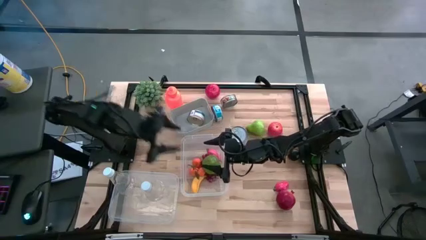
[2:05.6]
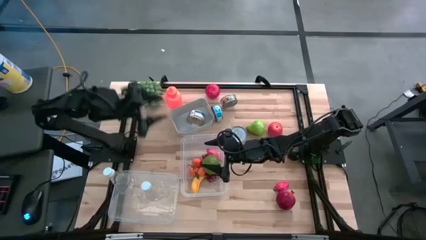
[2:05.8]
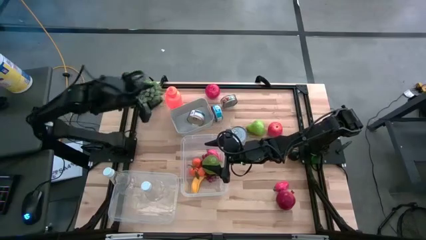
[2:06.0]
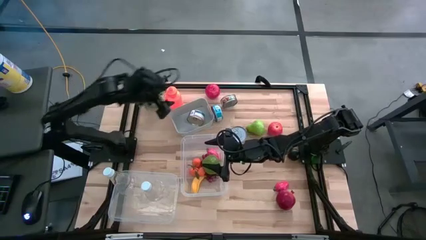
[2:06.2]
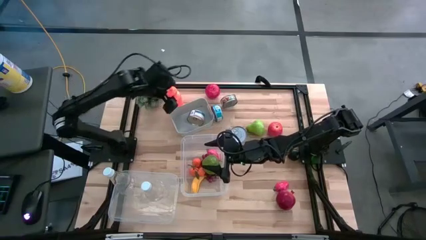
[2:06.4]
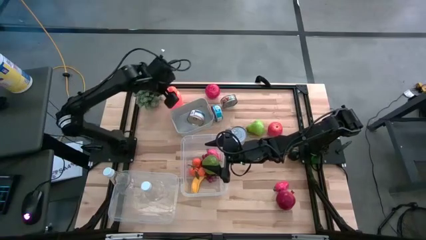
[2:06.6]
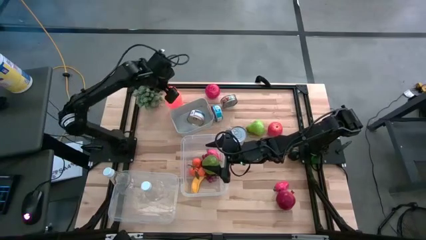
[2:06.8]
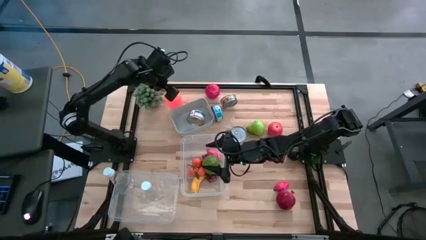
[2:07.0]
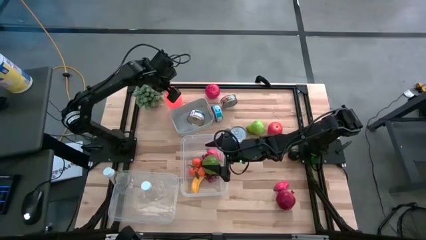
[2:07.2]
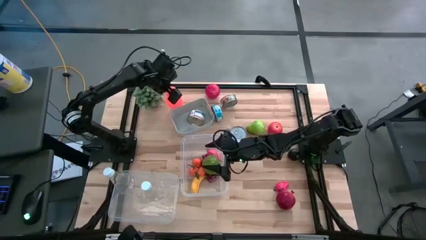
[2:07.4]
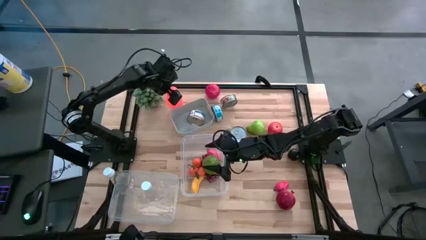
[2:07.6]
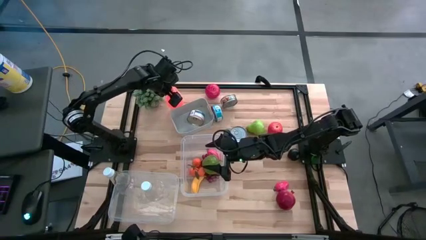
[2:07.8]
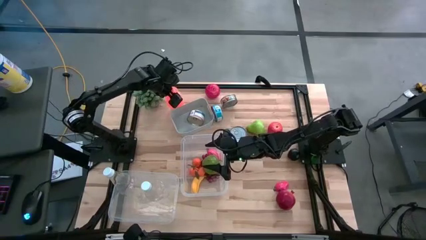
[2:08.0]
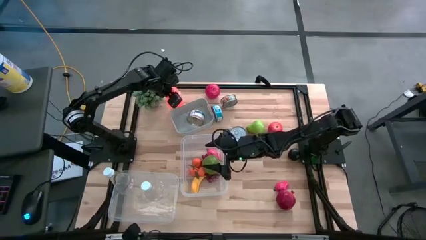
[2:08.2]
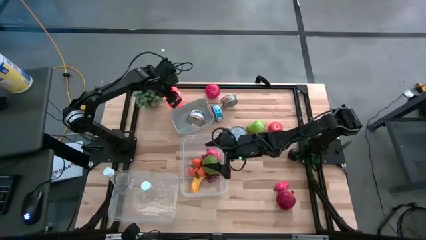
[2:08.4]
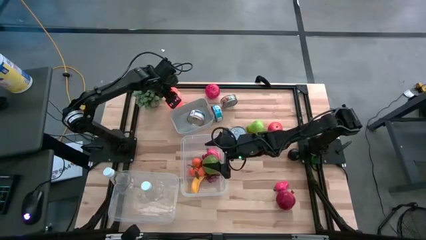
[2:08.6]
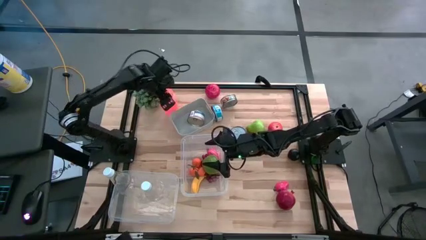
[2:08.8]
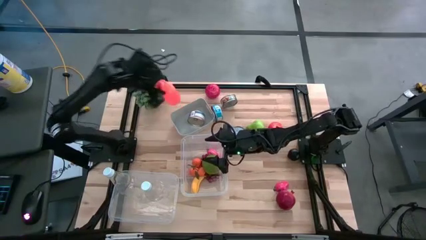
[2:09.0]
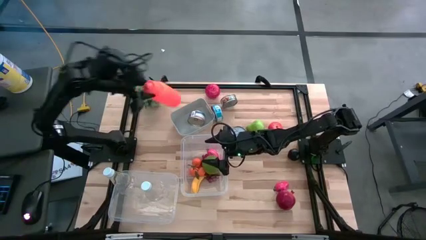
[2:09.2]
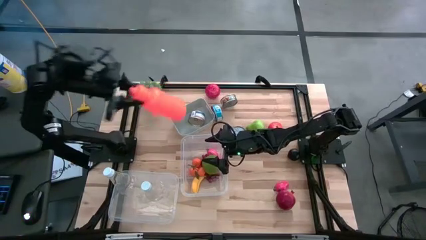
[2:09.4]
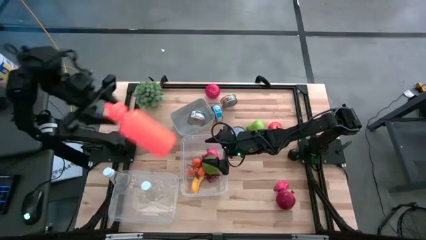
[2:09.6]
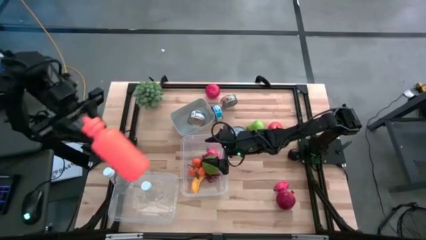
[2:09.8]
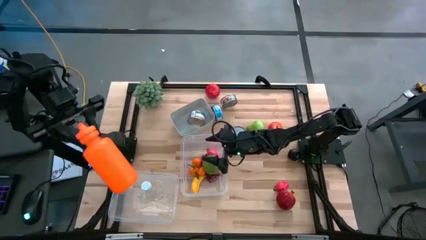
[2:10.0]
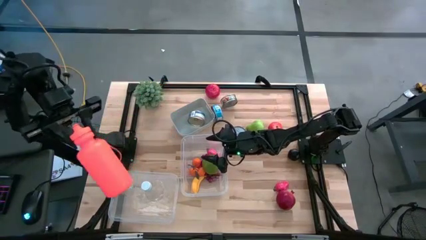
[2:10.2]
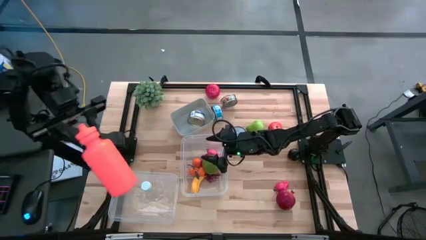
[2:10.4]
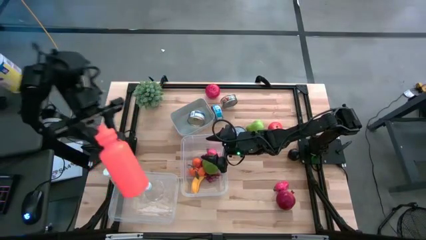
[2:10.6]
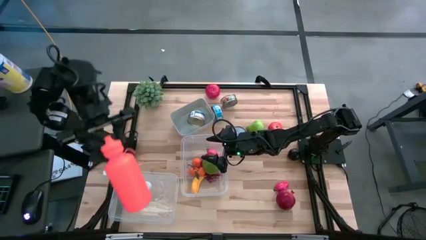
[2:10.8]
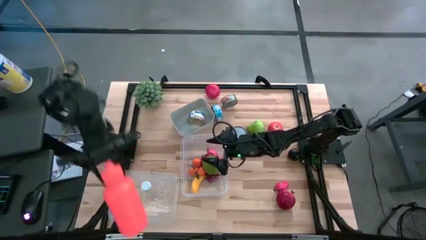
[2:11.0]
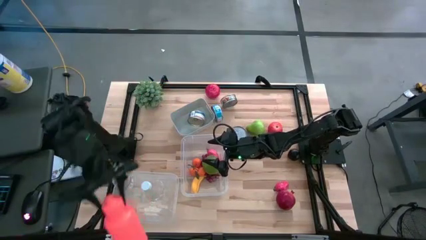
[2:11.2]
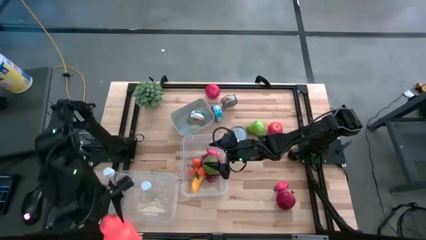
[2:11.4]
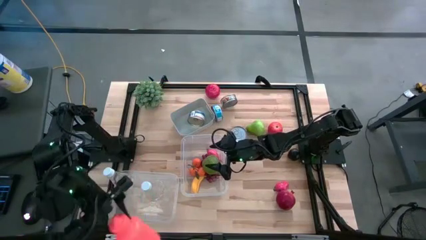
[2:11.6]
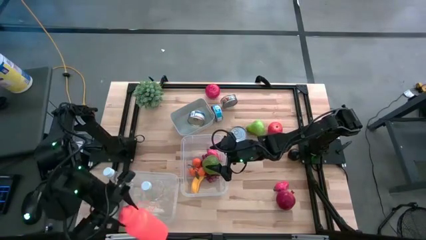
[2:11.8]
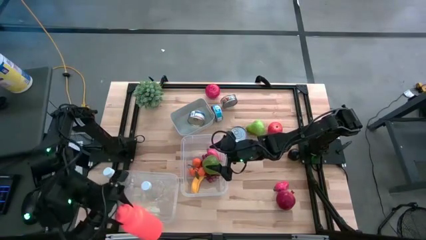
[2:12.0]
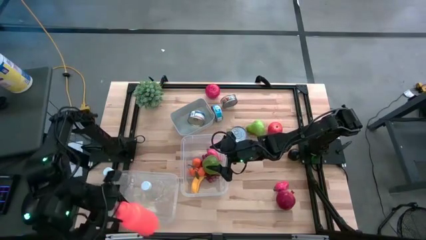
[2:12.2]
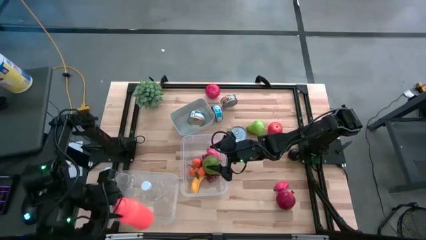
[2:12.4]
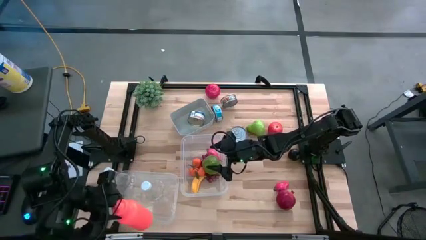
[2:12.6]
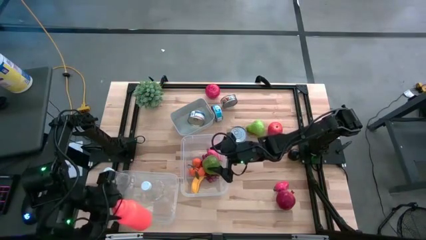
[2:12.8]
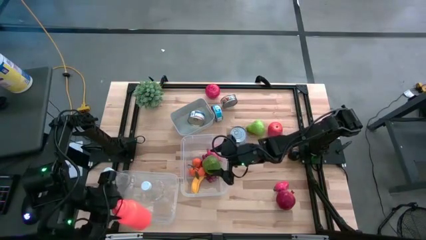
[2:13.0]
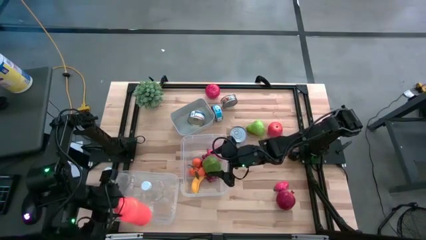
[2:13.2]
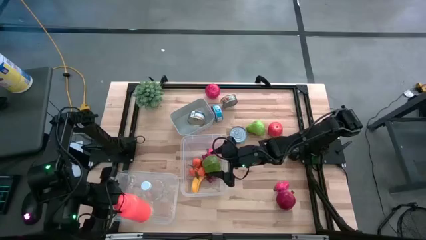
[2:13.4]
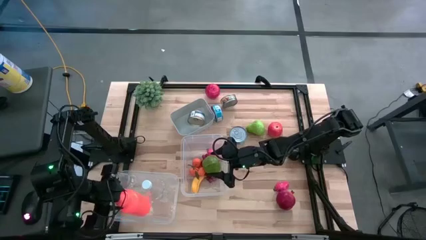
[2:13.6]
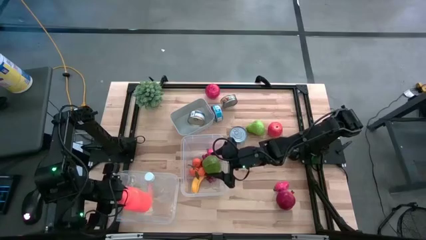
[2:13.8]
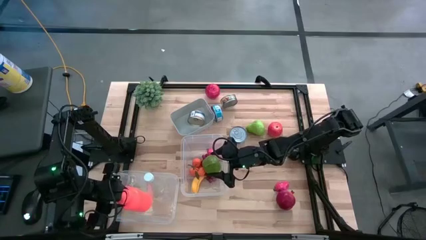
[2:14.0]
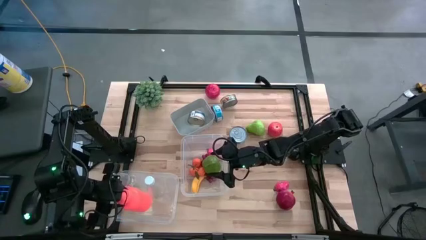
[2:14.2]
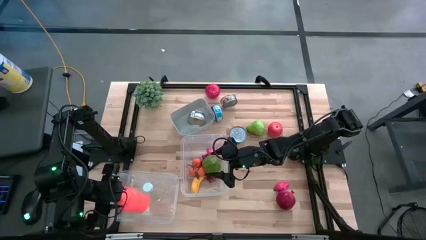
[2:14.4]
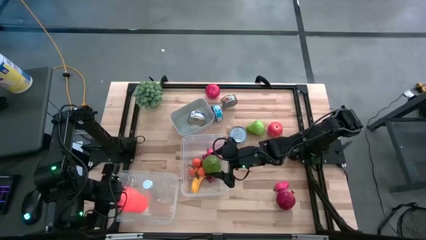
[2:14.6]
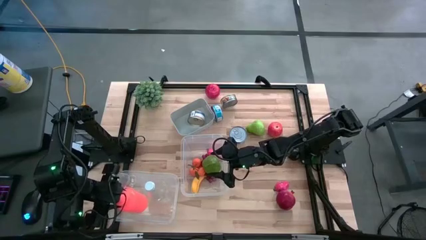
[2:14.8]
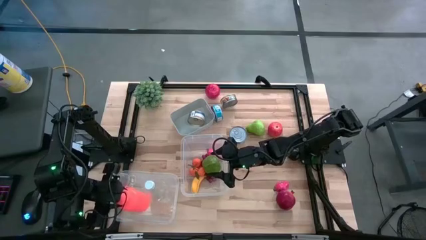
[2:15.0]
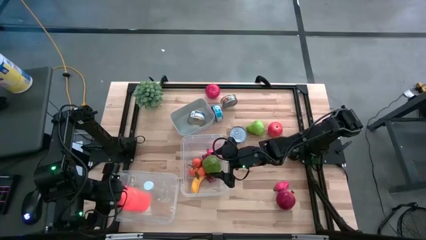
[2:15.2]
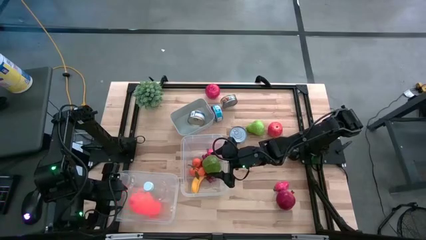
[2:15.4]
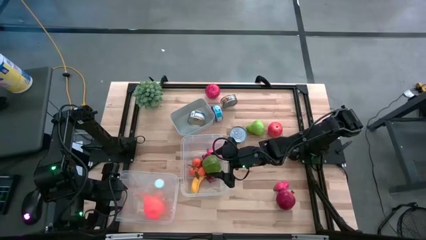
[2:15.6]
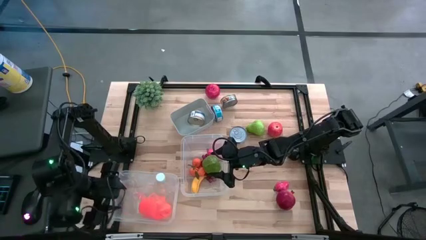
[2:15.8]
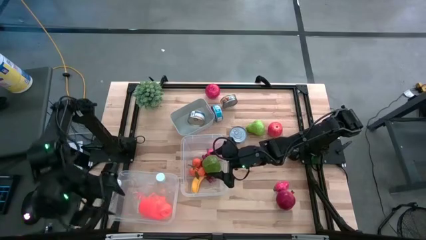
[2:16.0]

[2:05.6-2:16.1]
Task: Pick & Place Food Item
Put the orange tumbler into the left transparent bin

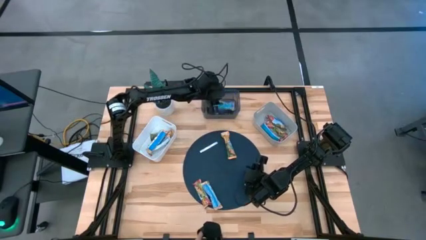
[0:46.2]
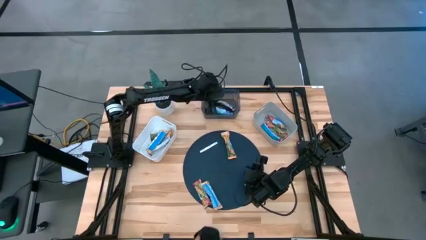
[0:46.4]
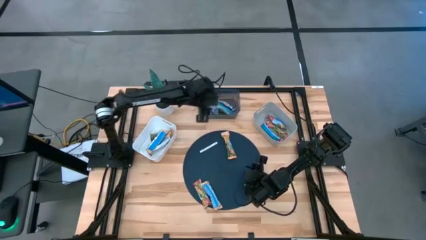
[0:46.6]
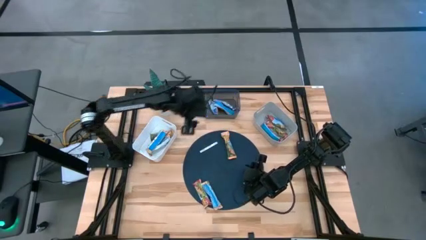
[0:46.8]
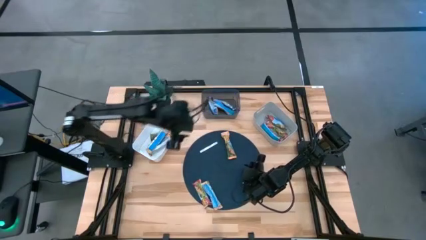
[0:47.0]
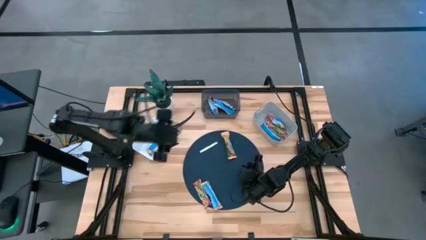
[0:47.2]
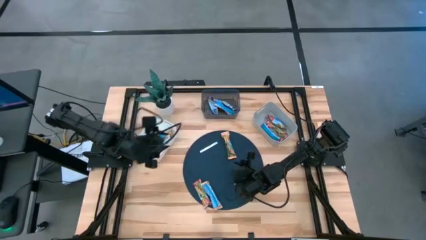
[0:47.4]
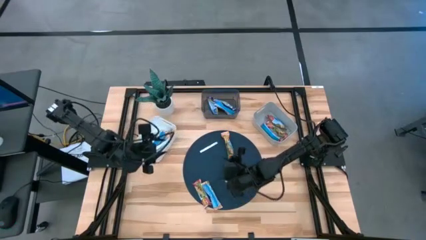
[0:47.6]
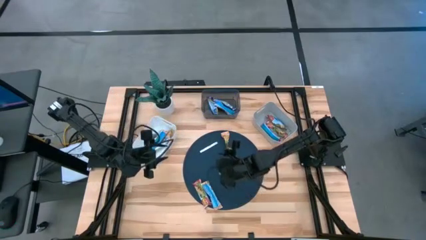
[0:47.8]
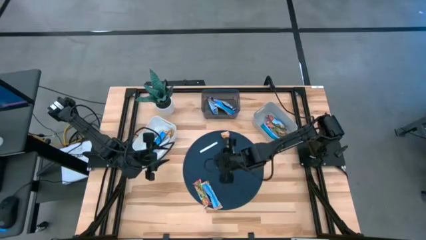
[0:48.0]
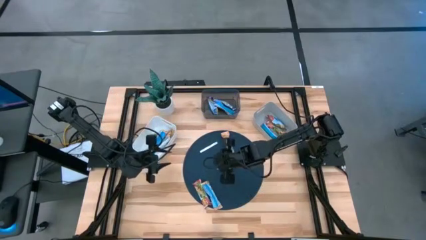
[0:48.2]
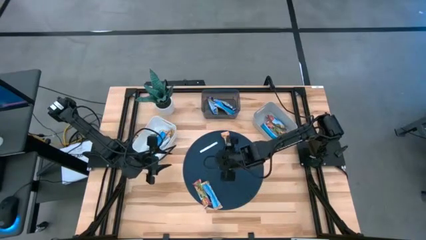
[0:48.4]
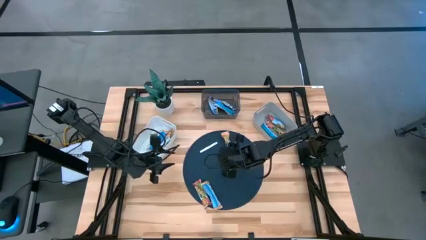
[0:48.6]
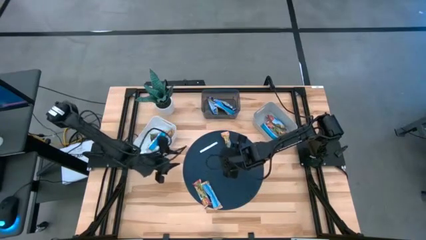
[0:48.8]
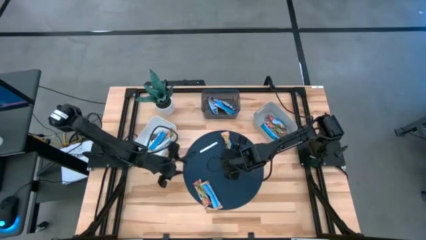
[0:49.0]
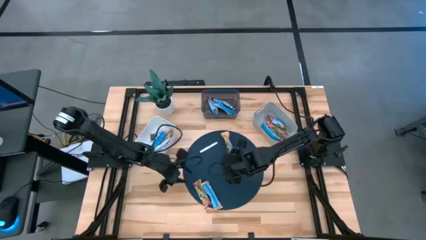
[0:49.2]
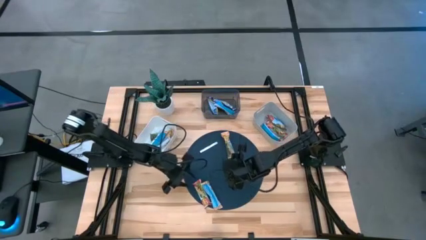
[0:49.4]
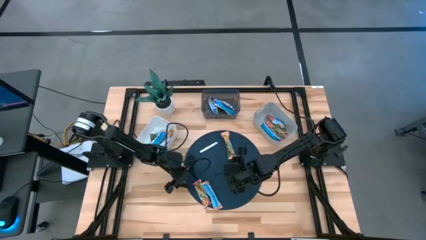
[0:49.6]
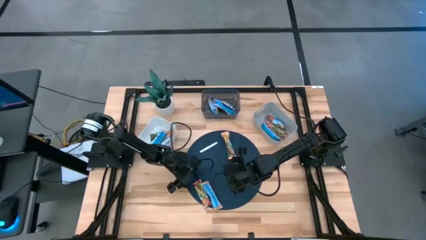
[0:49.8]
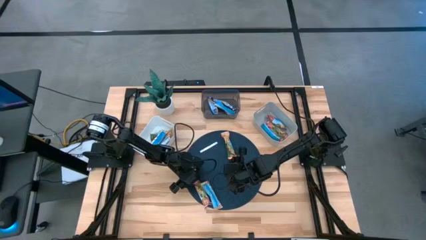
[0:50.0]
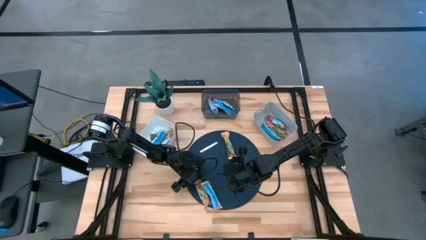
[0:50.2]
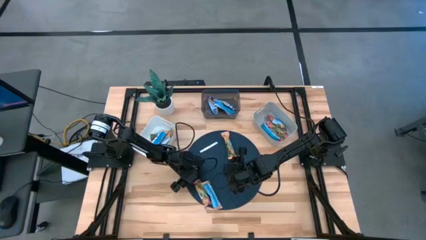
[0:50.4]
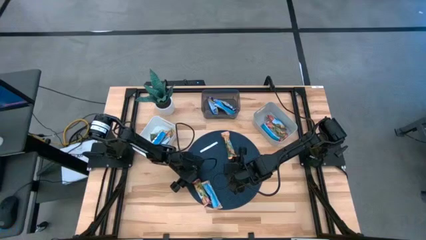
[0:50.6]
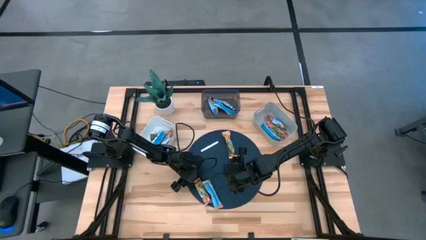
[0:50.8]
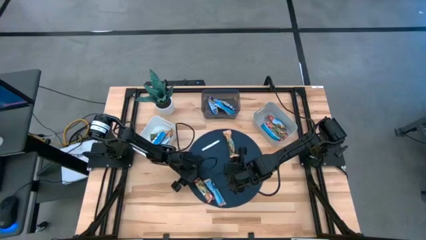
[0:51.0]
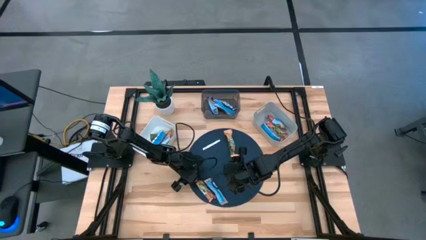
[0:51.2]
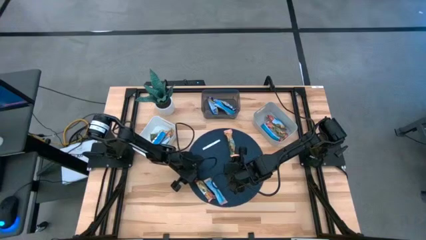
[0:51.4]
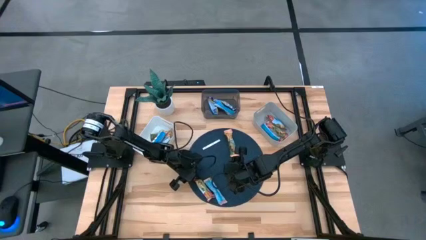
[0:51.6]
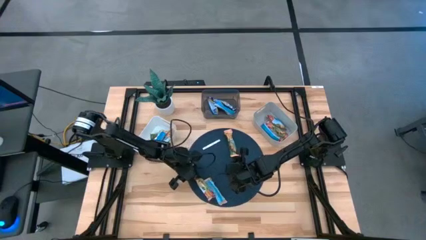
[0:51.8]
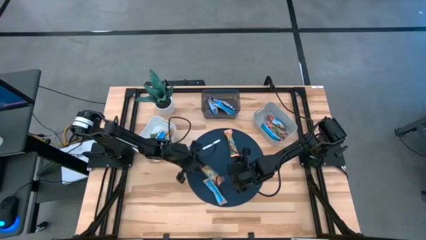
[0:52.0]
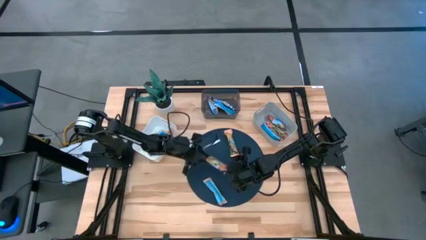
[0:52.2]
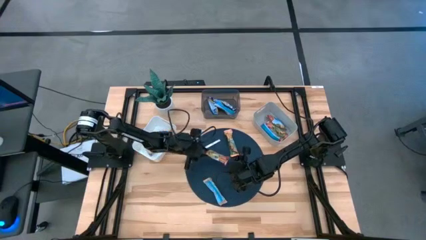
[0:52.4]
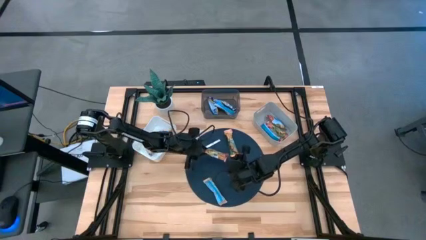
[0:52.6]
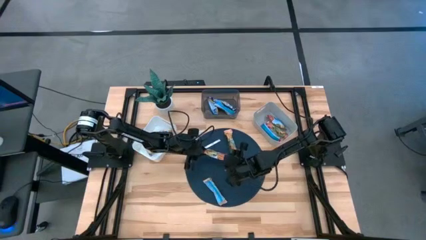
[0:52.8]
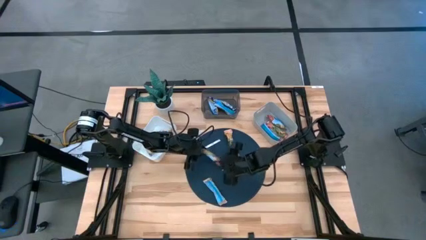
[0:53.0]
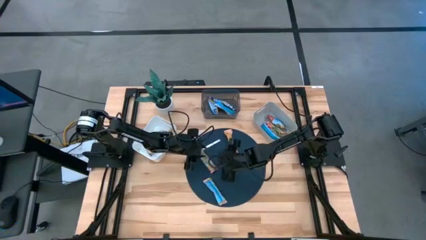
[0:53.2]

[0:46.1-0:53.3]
Task: Pick and place Granola Bars by type
Put the red granola bar into the gray bin
